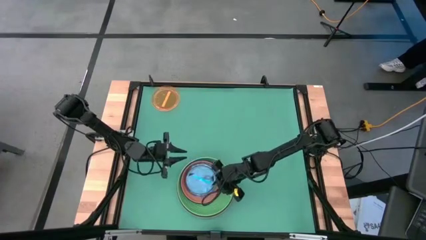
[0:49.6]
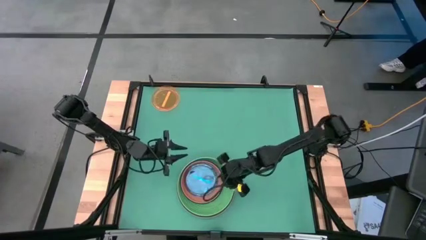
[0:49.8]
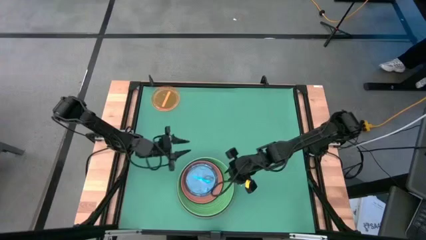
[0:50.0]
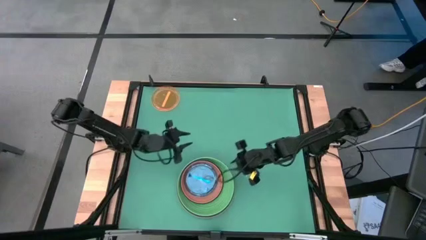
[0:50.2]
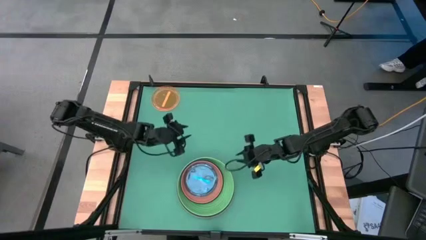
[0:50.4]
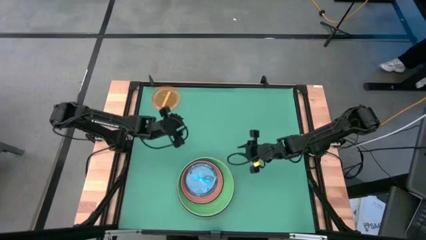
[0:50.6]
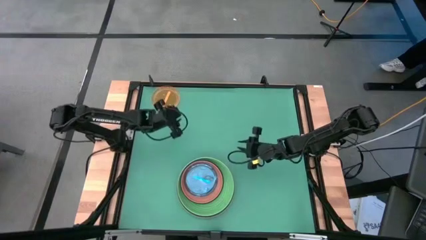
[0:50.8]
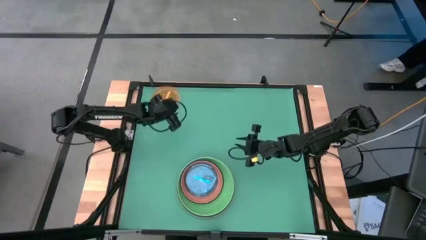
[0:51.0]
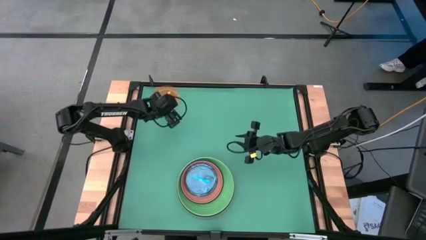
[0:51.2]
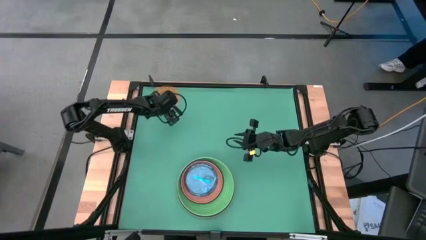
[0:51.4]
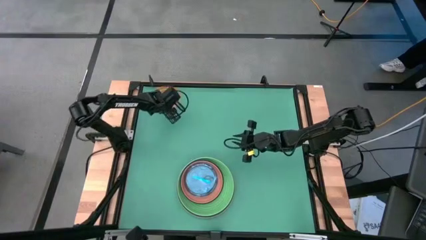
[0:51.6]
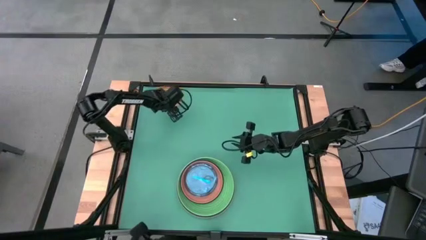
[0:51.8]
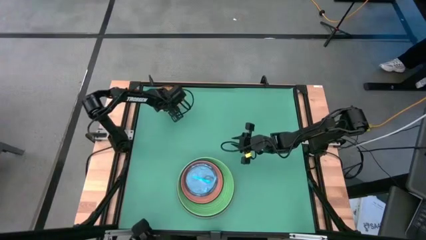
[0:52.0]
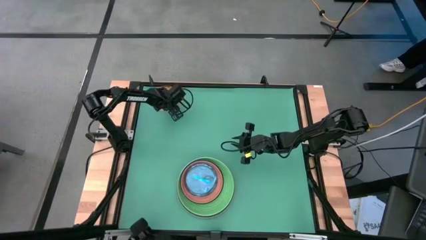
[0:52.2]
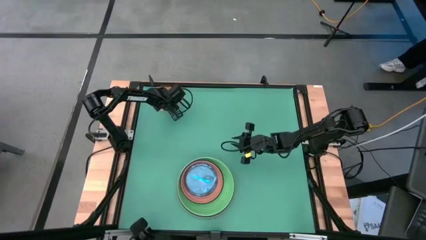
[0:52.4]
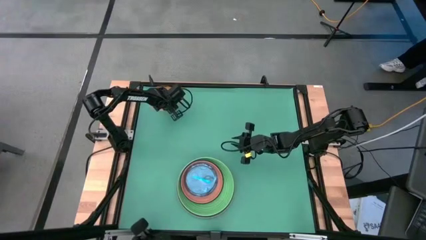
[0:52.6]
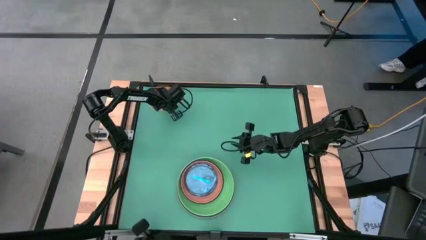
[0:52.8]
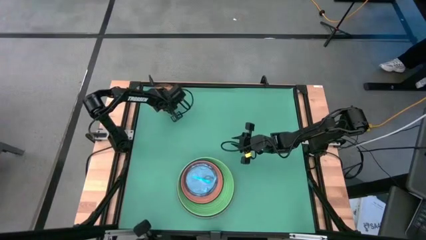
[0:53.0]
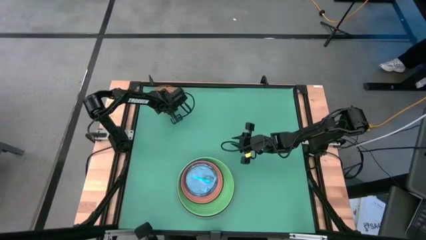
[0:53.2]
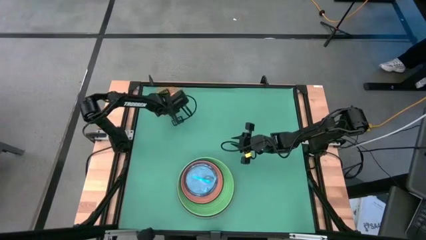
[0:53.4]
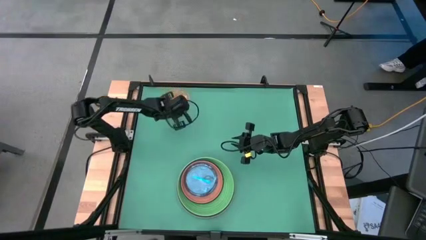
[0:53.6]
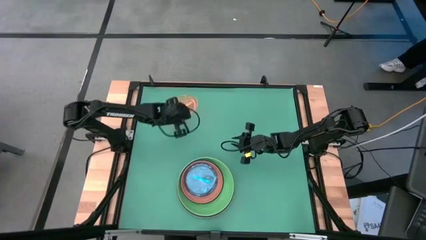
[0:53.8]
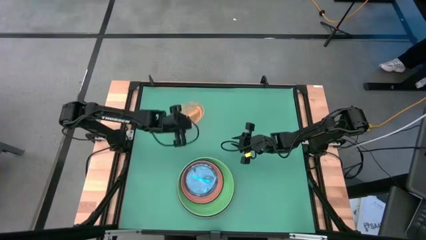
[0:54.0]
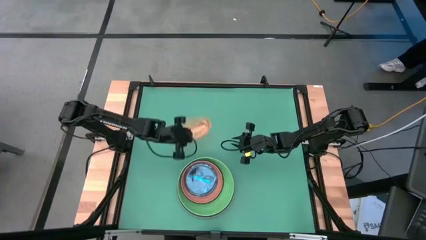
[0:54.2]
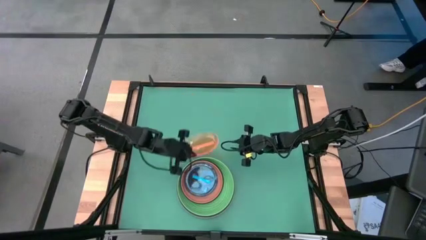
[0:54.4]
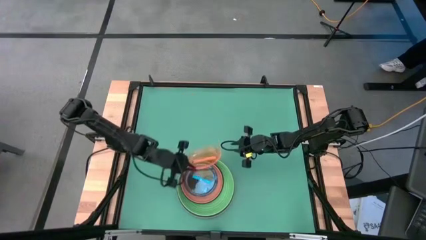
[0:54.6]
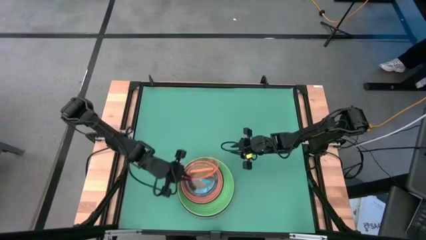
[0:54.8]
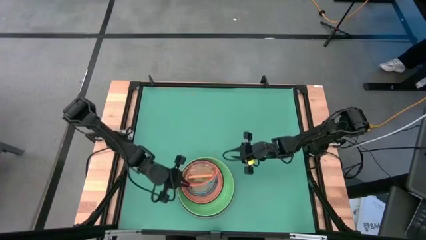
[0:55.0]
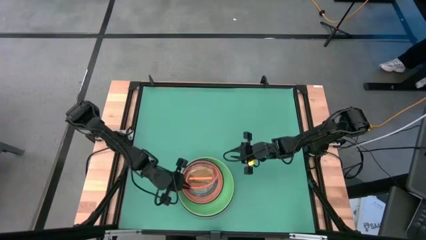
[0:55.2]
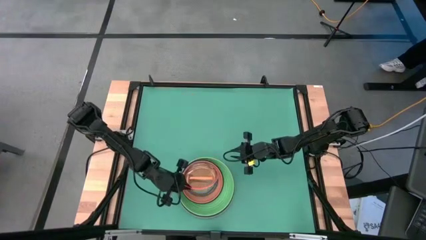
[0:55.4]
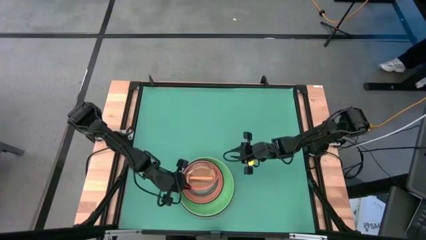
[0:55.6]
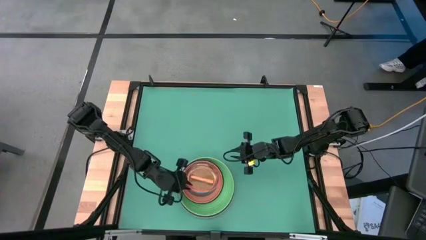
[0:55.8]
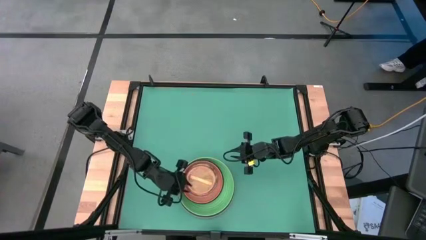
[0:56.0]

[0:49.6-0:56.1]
Task: Stack plastic plates
Stack the transparent orange plate on top of the transparent blue plate

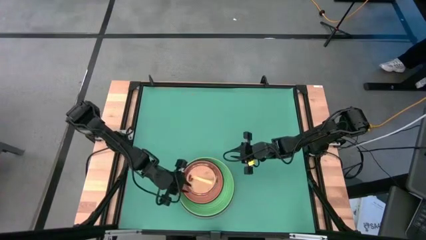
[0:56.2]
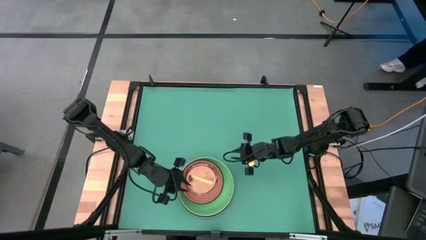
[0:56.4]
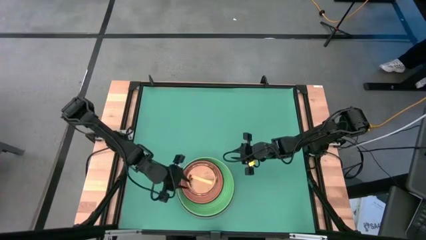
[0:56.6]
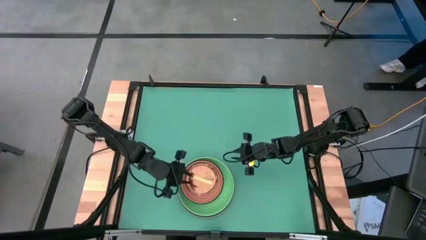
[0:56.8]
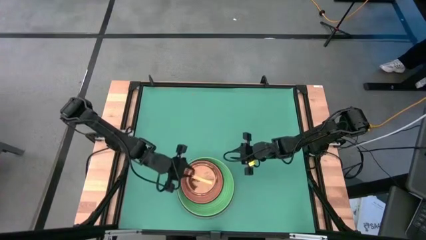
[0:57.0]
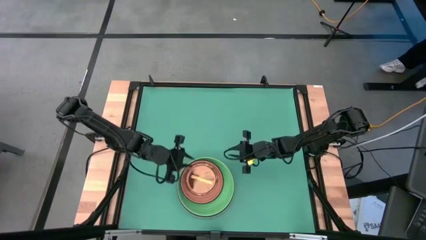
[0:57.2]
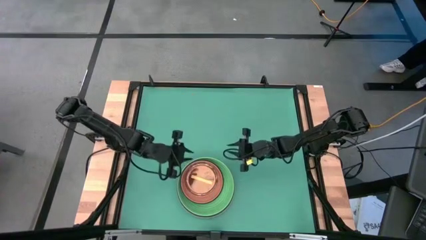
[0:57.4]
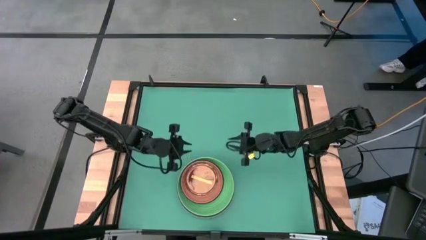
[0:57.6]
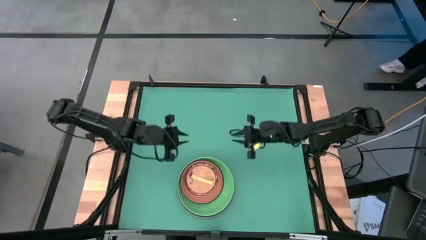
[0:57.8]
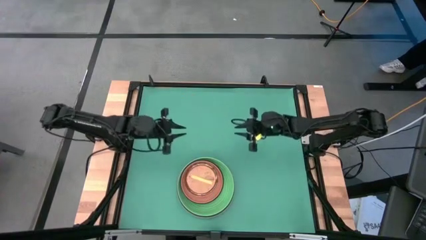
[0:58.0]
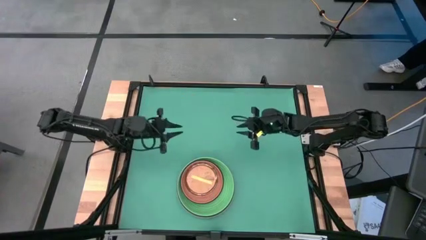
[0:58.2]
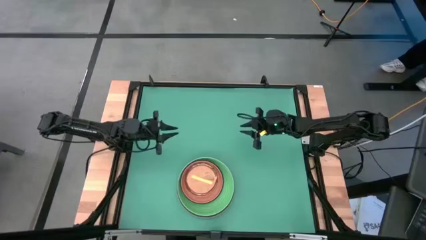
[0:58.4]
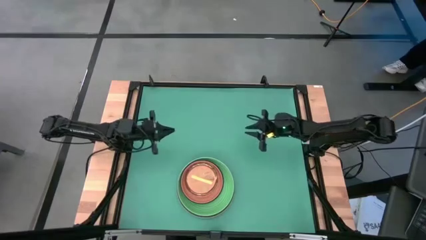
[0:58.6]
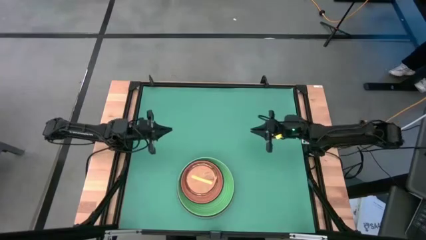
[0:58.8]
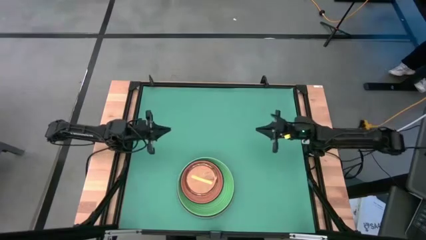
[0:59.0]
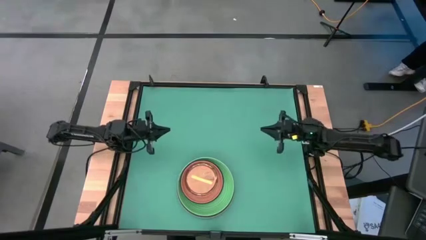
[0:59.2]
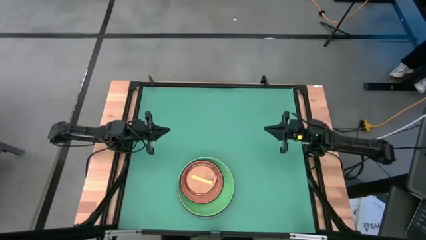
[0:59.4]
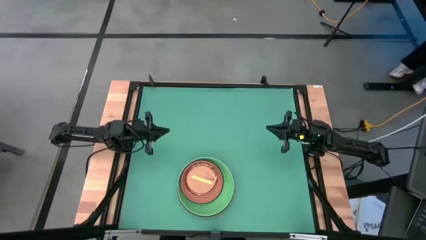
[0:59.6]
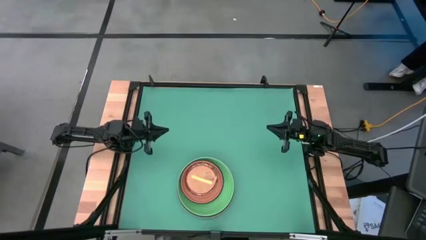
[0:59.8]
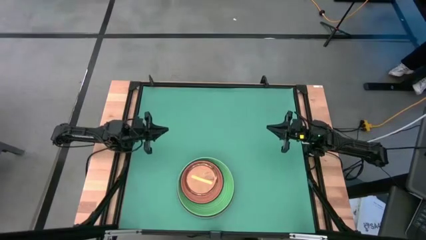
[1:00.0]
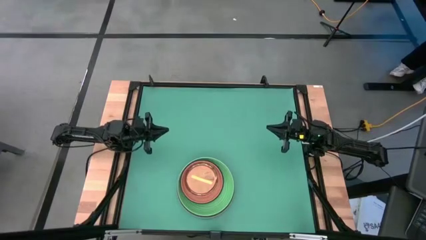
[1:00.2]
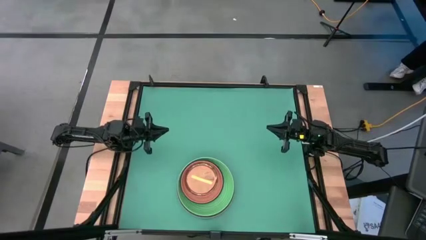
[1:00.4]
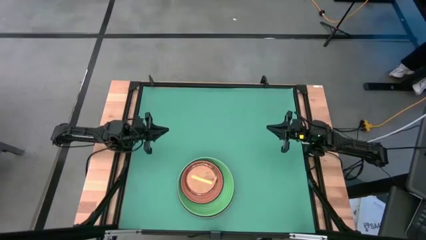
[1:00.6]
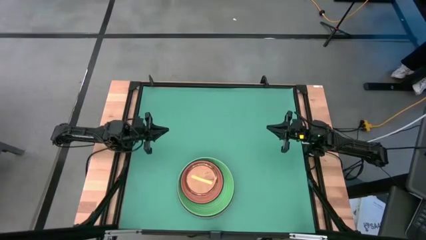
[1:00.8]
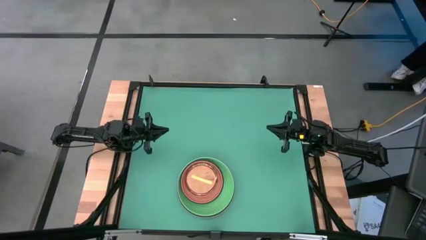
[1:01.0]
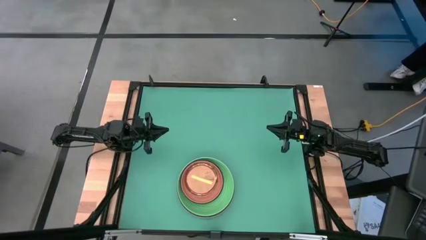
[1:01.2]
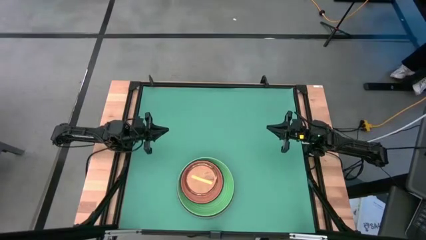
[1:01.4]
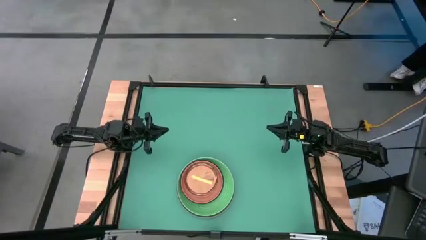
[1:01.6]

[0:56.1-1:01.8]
Return to Home Position

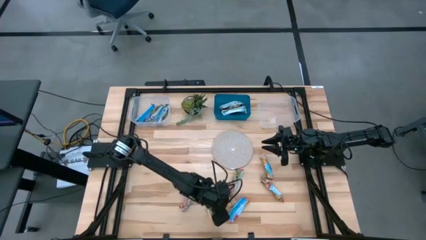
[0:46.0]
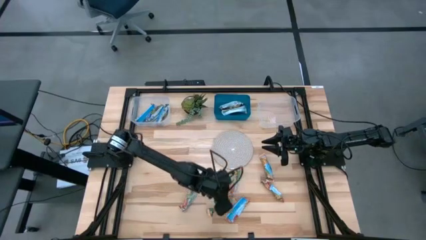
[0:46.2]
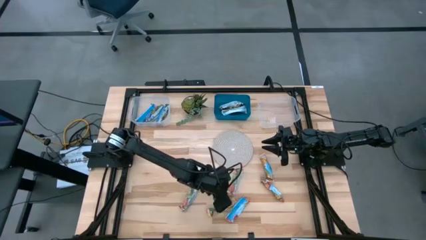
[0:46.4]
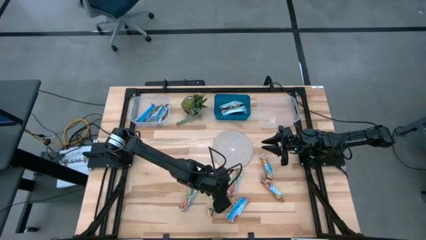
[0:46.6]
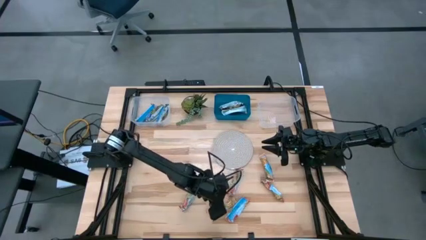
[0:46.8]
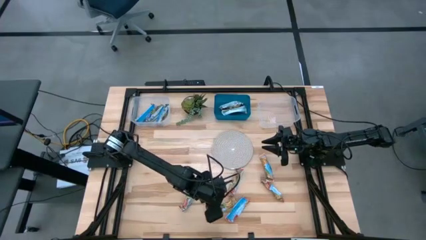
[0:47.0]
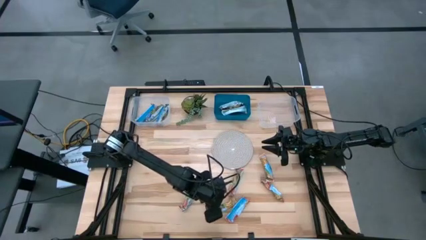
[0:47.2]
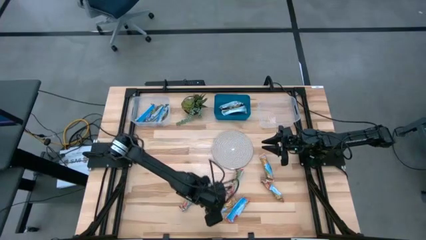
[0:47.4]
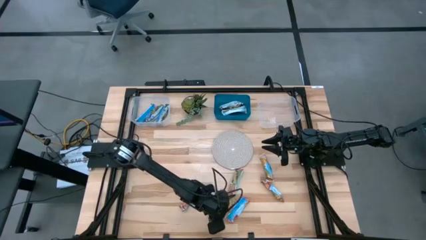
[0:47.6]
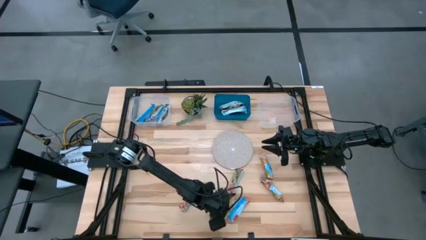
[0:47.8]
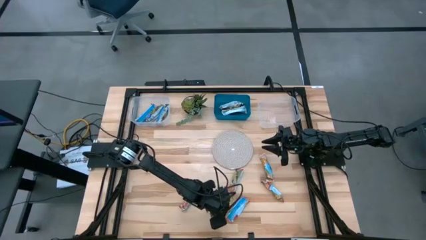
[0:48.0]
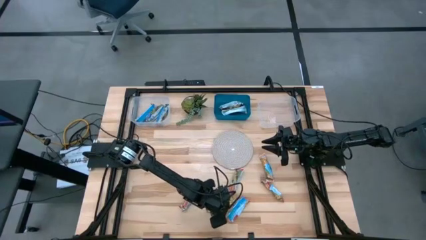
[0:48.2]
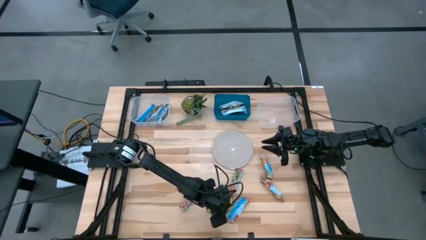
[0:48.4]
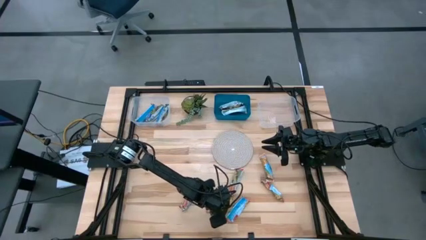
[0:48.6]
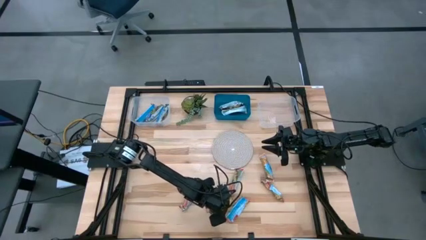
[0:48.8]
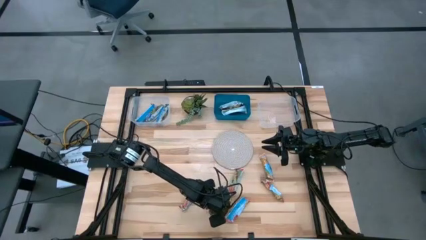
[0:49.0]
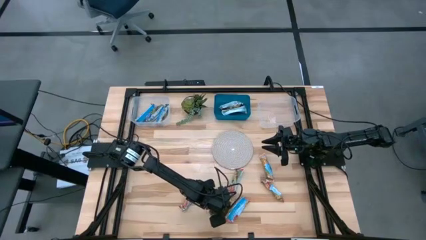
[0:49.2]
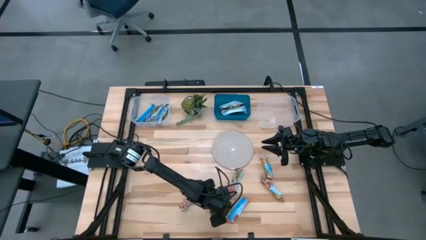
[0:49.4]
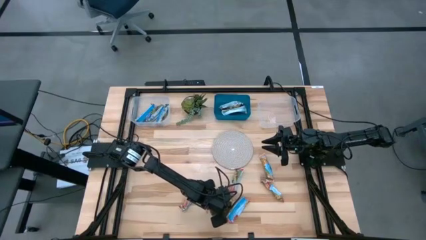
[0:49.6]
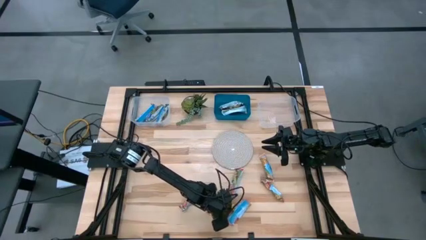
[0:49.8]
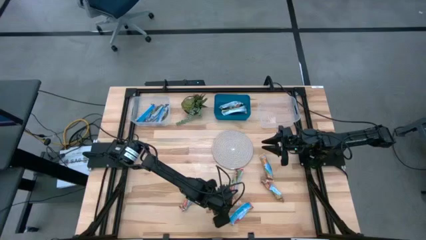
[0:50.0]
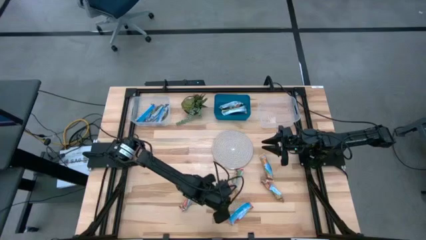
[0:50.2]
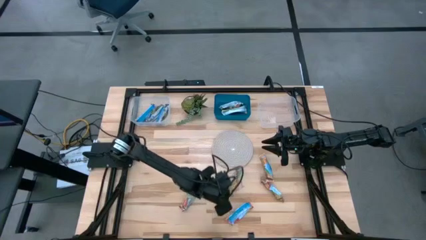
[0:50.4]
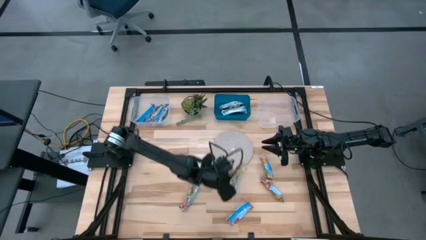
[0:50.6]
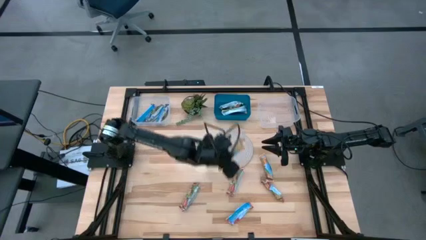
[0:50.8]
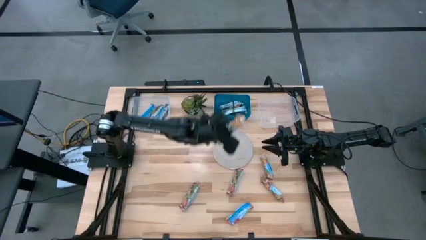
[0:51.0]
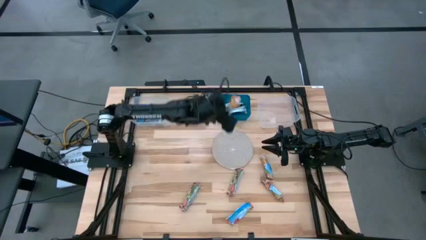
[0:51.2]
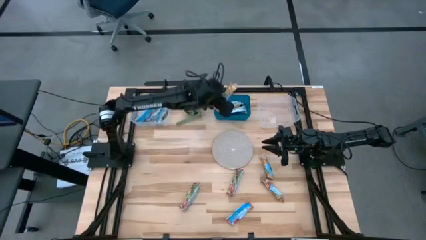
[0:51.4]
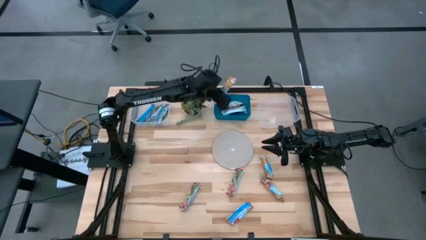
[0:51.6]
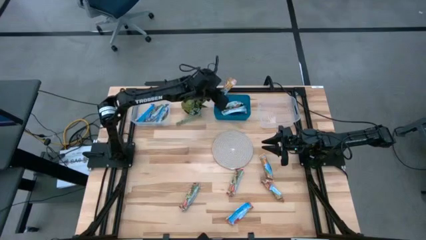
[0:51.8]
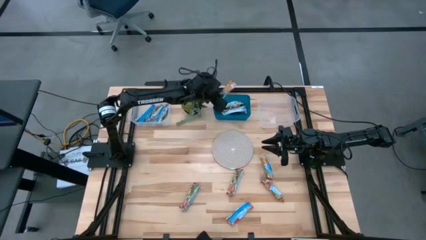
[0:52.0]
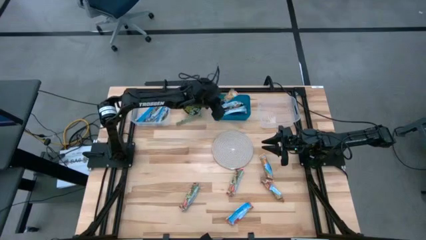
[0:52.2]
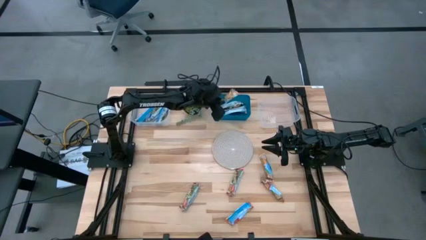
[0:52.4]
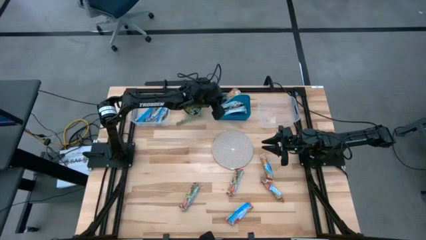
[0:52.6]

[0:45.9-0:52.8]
Task: Pick and place Granola Bars by type
Put the yellow granola bar into the blue bin
